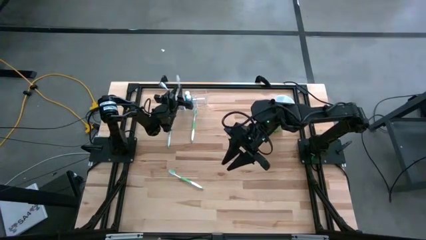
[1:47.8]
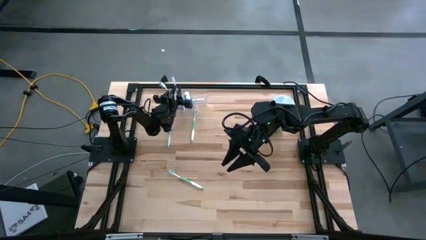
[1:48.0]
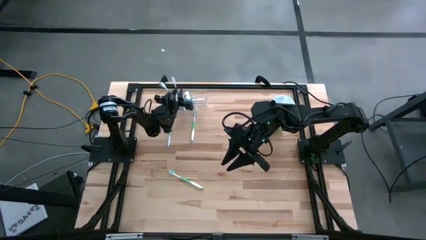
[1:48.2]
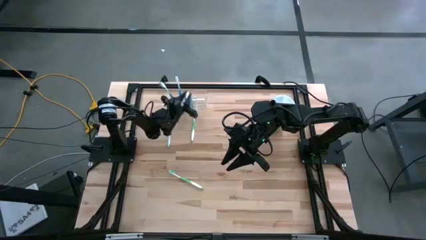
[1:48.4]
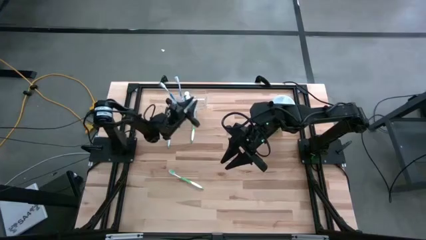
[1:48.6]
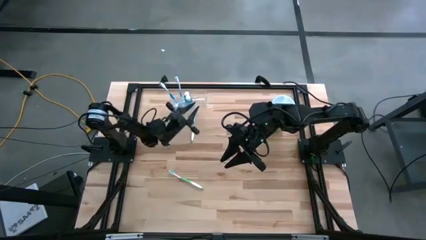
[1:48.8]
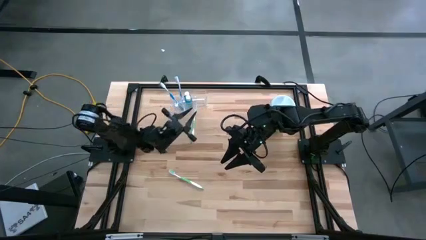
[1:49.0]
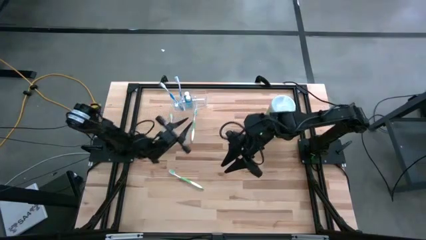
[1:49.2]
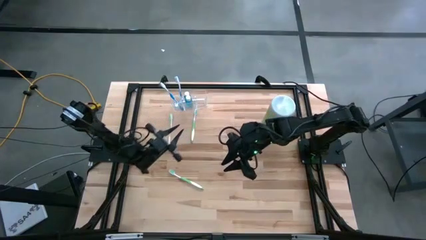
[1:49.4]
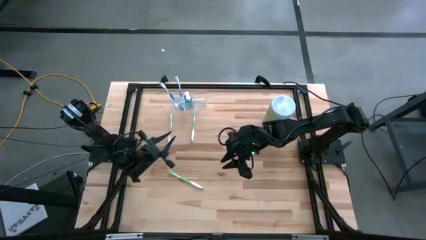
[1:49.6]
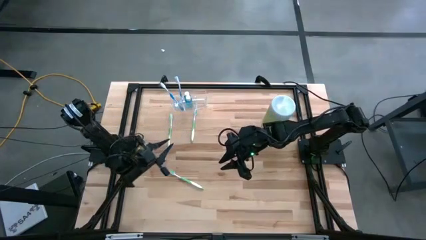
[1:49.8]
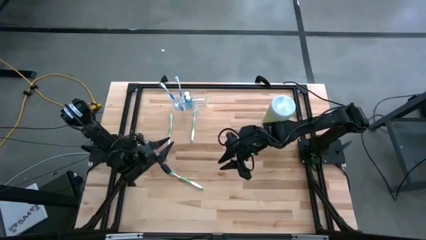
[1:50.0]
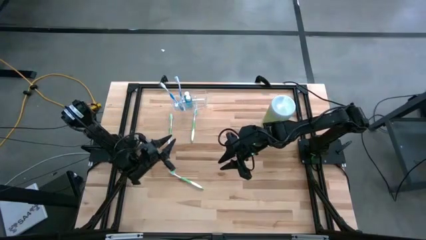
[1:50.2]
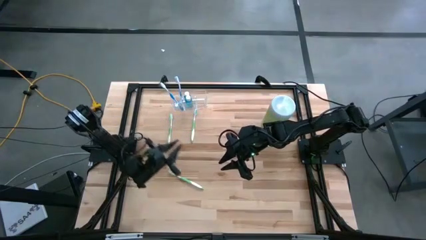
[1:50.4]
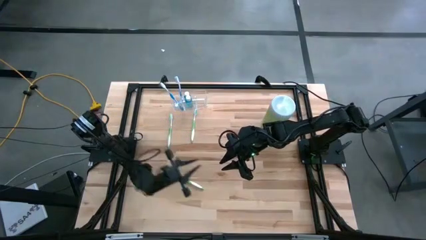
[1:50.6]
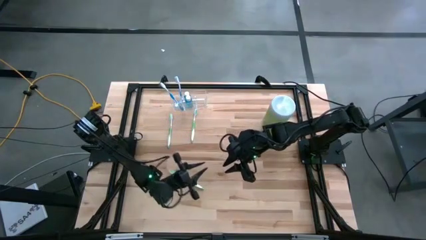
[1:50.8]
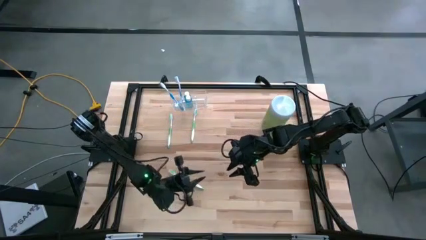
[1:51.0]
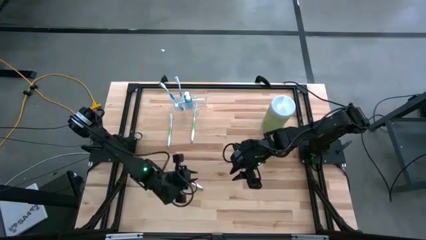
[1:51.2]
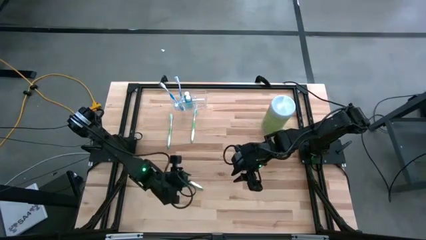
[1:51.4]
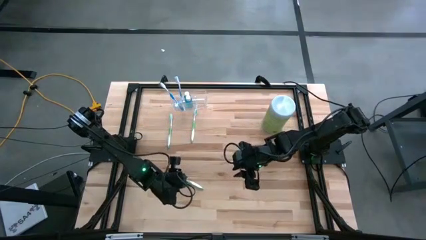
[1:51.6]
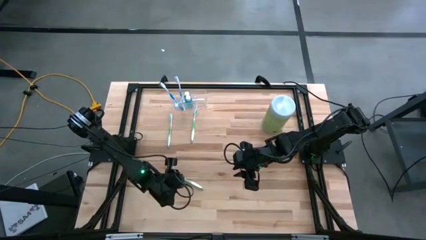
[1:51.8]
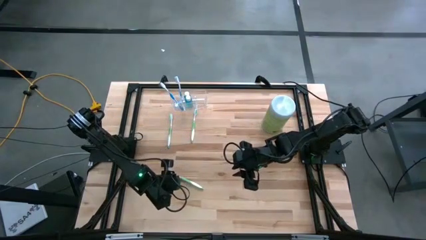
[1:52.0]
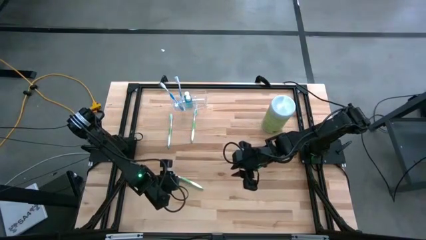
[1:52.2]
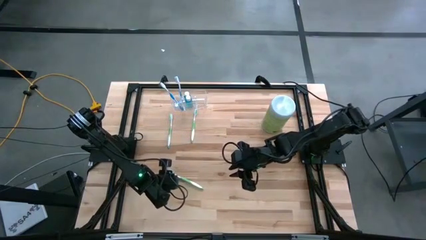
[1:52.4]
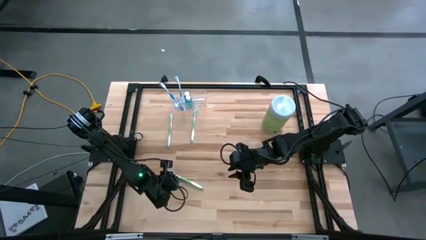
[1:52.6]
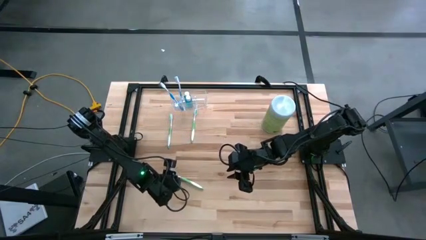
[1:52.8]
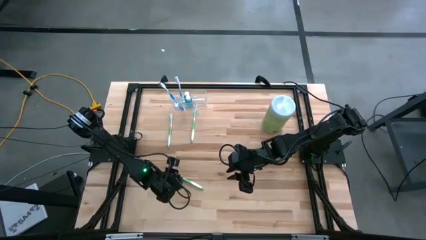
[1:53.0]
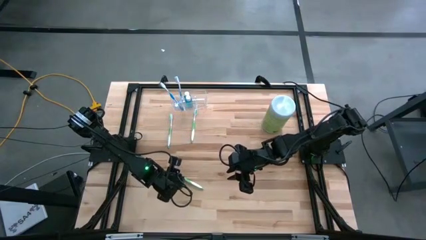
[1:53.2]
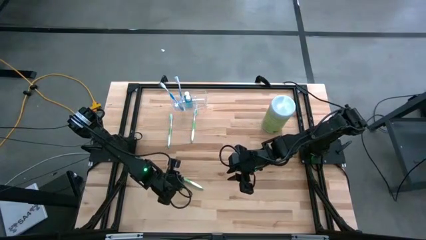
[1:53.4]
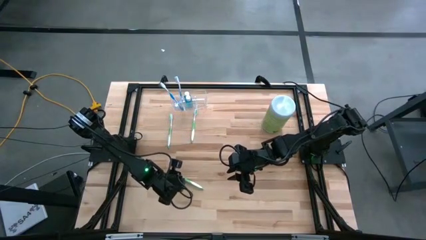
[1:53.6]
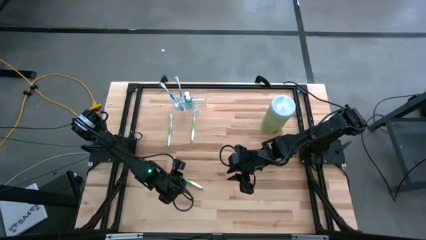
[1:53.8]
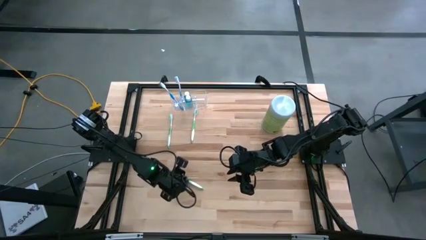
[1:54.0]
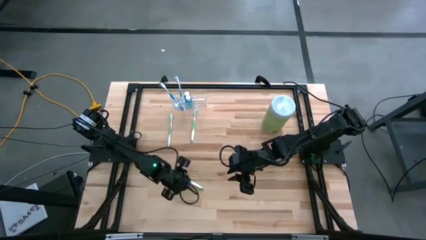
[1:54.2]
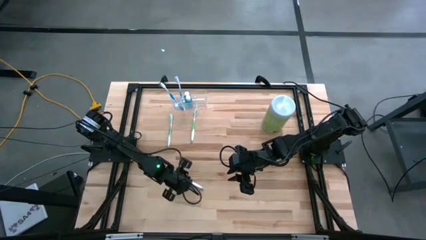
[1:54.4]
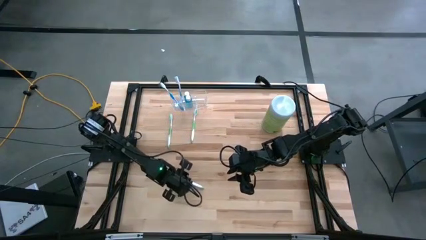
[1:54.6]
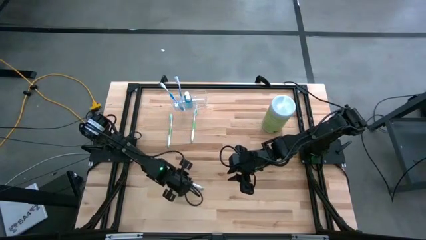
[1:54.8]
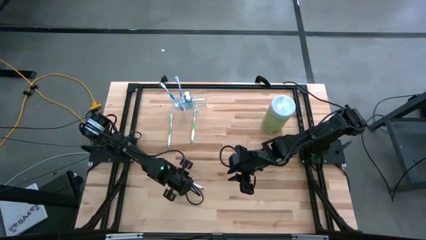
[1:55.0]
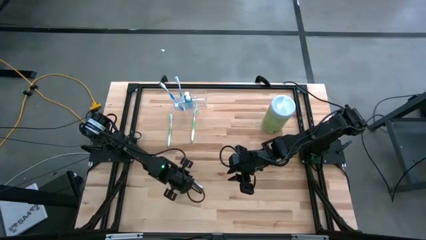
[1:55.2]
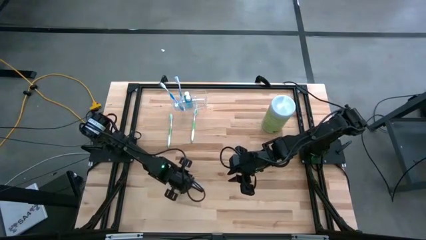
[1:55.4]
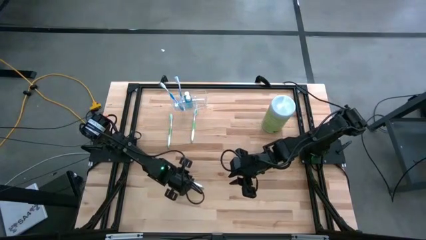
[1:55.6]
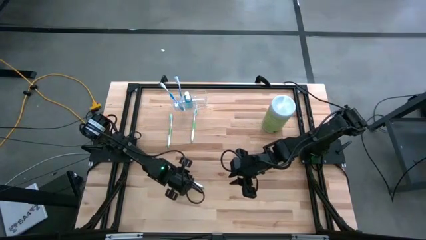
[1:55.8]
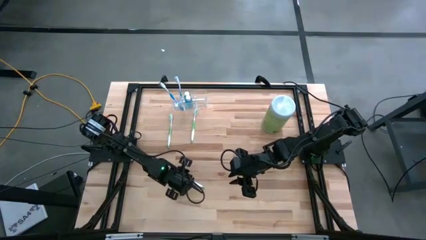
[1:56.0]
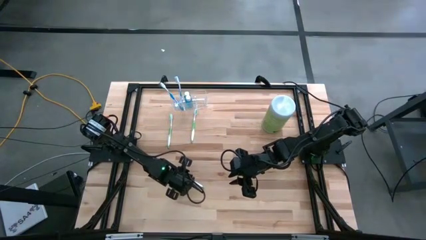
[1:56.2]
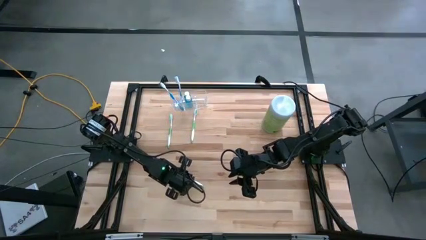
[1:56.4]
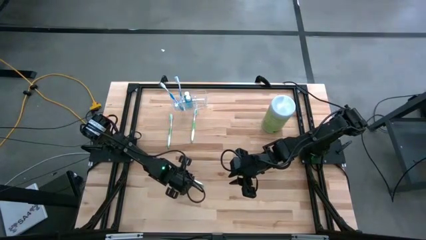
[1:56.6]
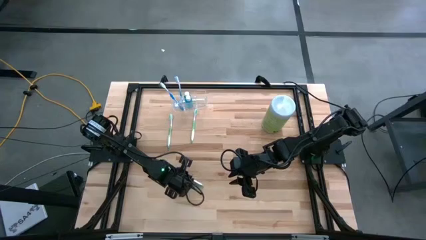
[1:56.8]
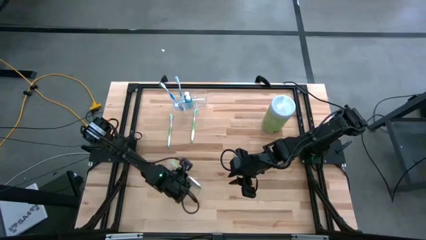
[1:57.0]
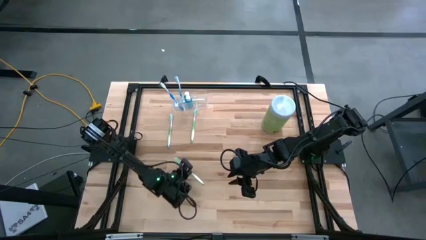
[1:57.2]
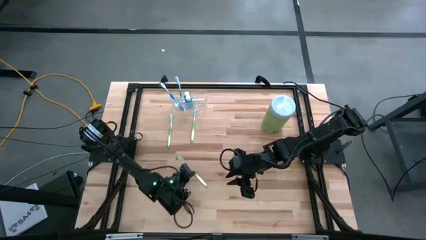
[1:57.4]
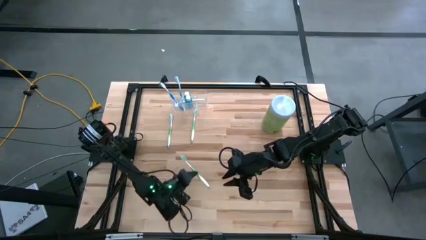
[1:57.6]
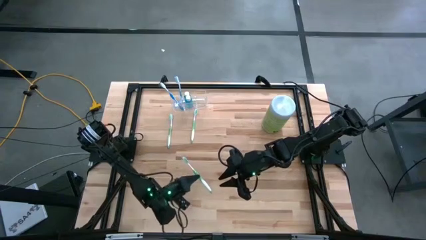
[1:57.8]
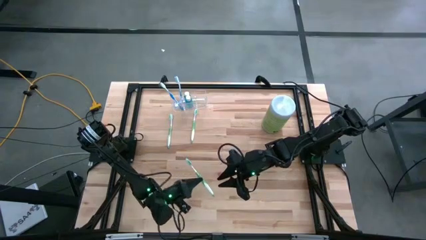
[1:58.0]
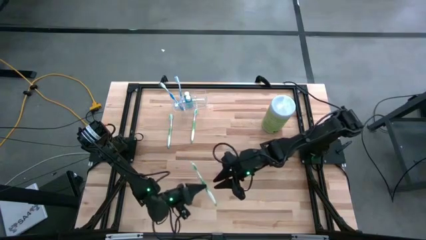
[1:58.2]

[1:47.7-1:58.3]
Task: Pick & Place toothbrushing station
Put the bottom green toothbrush into the right section of the transparent organizer

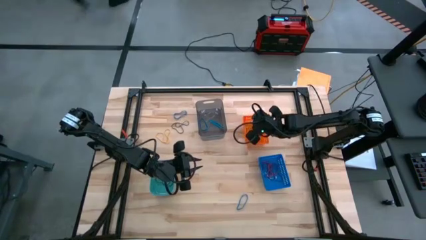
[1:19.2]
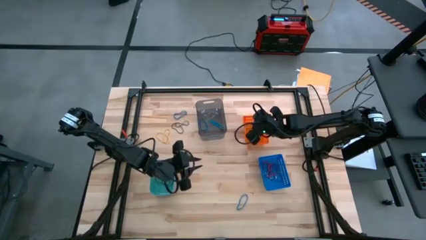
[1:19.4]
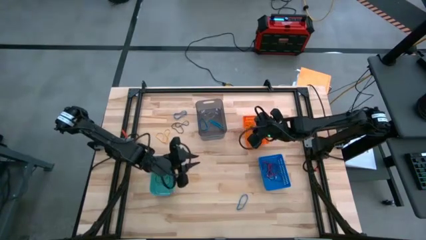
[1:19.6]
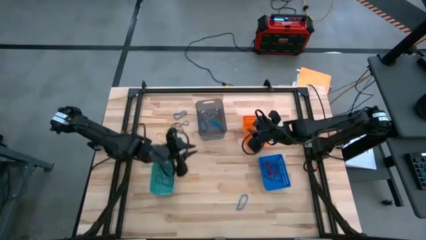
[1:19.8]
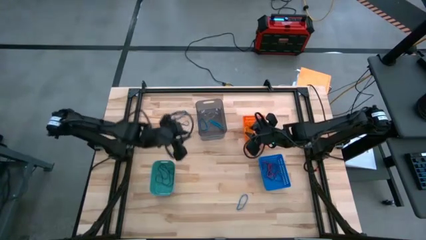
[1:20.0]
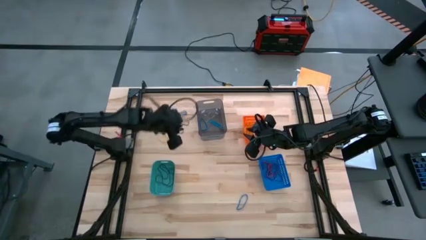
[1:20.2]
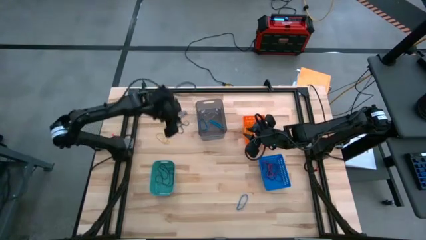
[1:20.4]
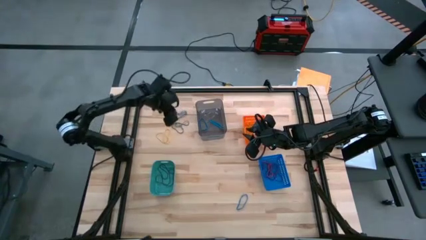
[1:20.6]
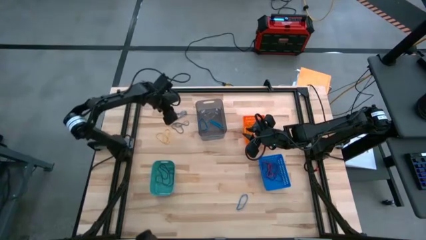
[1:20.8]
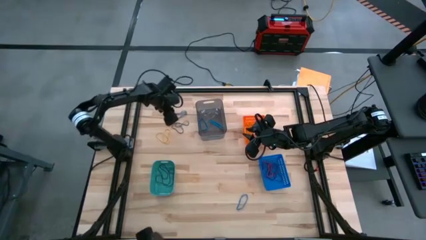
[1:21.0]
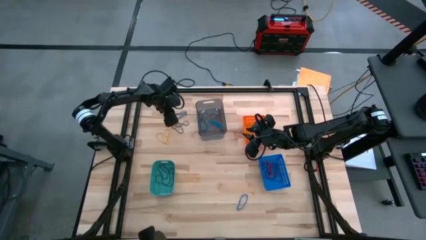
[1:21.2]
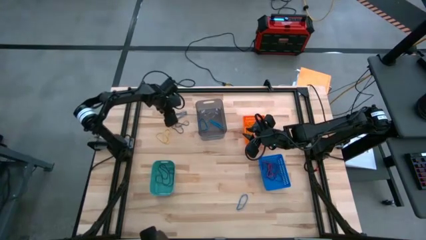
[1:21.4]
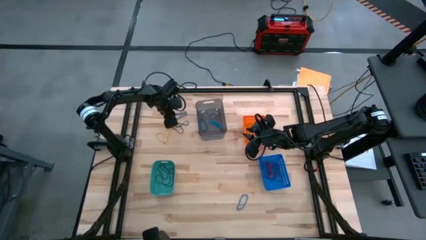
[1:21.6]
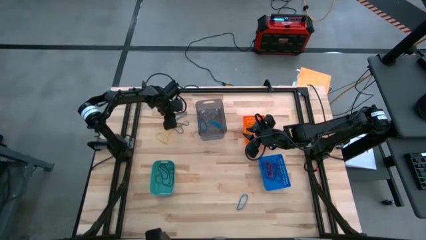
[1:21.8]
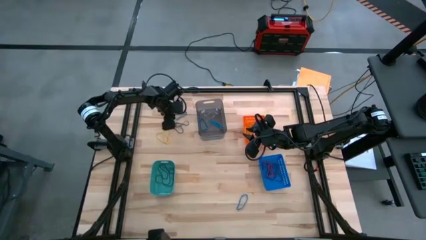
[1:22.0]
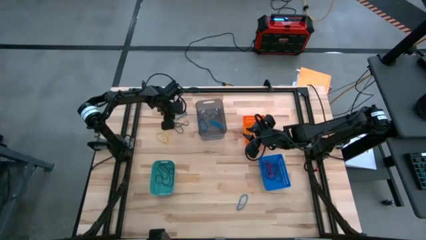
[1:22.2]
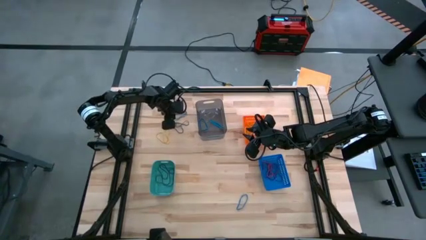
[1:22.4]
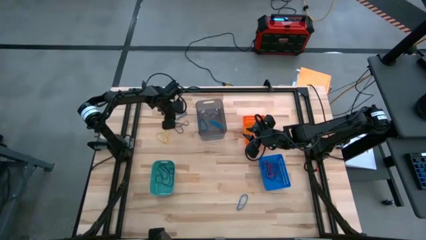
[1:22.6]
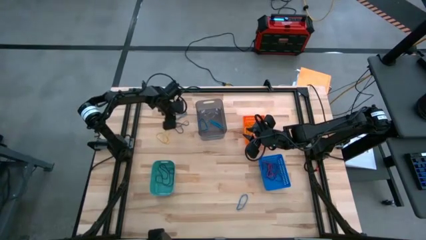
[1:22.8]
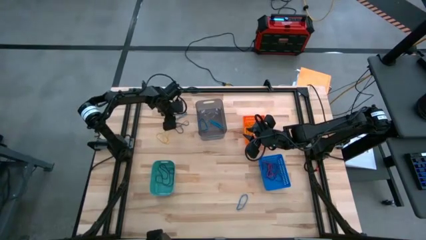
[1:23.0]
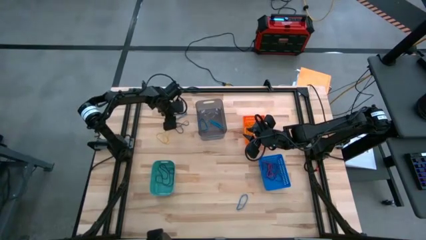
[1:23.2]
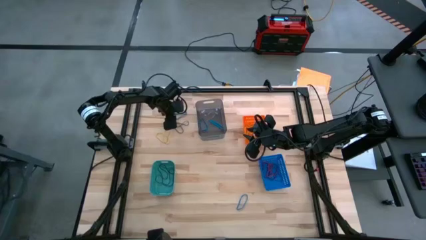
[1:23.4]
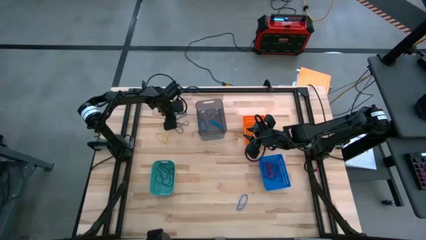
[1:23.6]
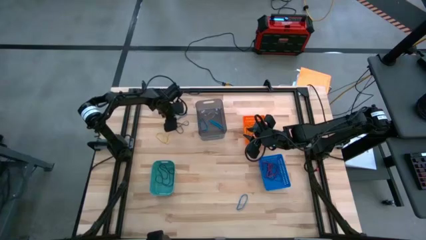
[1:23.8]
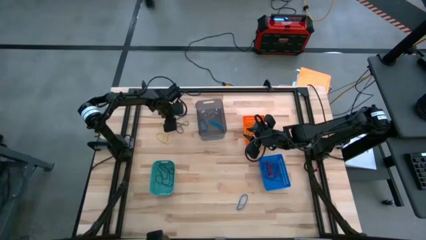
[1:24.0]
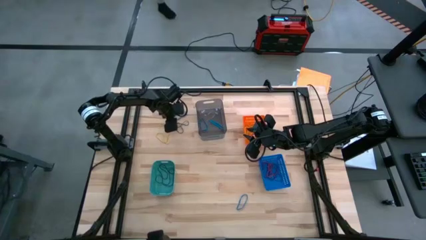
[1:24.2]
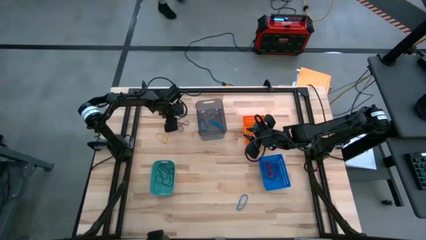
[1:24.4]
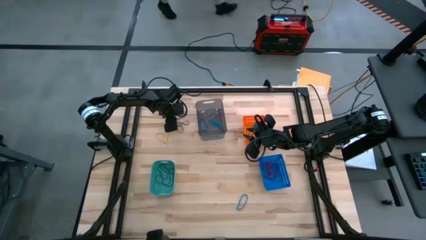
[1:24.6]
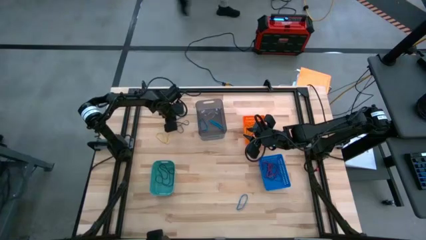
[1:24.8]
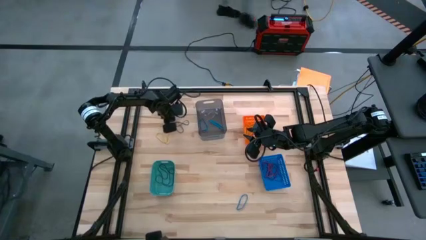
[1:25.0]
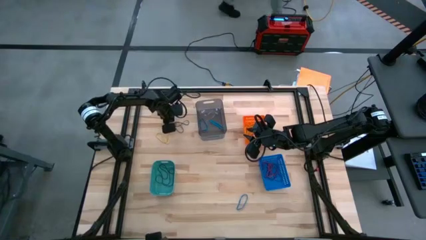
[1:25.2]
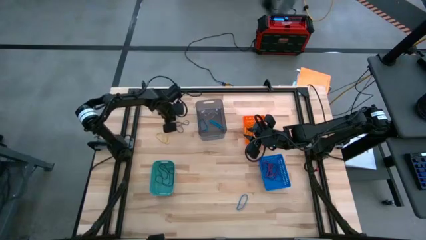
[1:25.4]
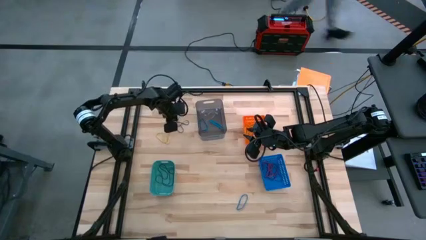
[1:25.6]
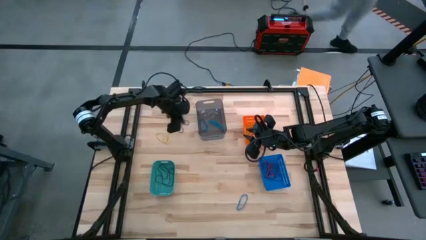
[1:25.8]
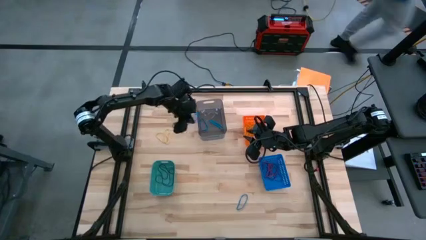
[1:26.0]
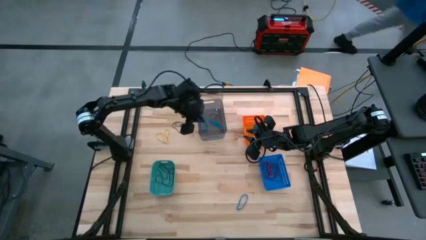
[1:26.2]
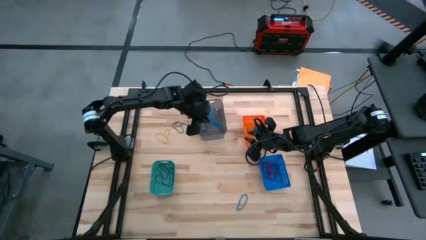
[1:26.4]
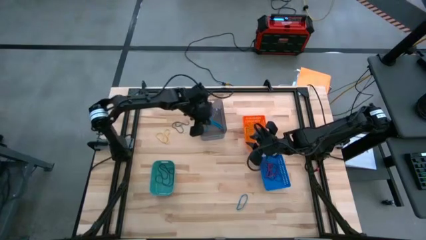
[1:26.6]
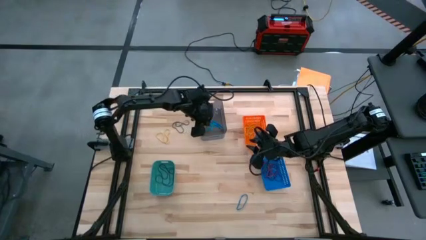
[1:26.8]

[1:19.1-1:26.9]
Task: Sort rubber bands into baskets
Put the blue rubber band into the black bin
